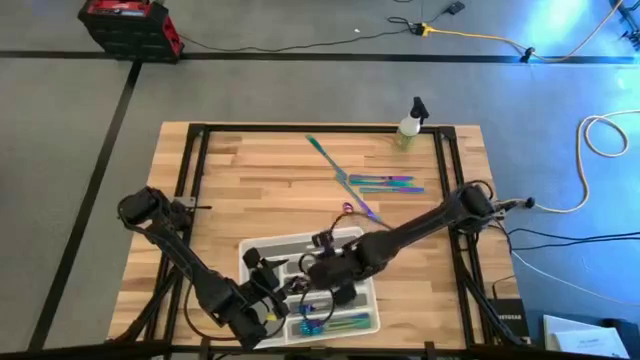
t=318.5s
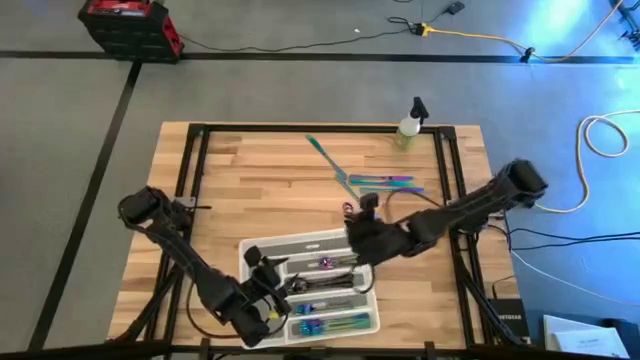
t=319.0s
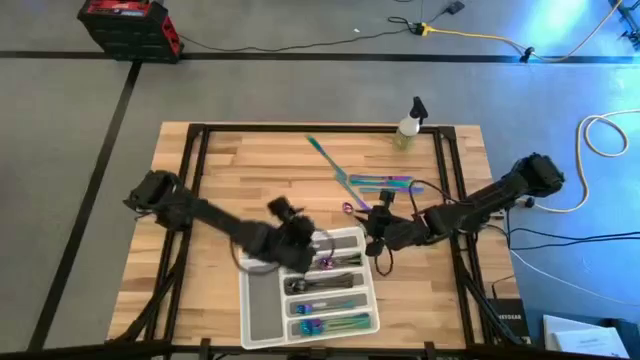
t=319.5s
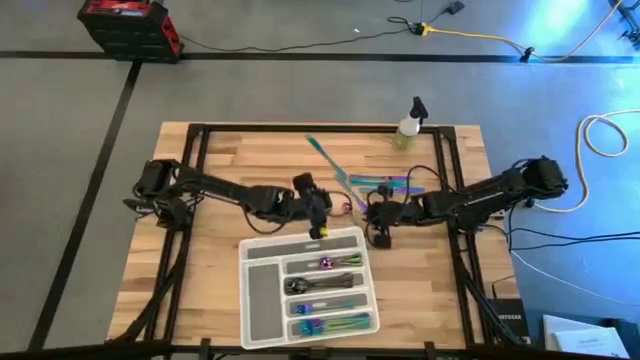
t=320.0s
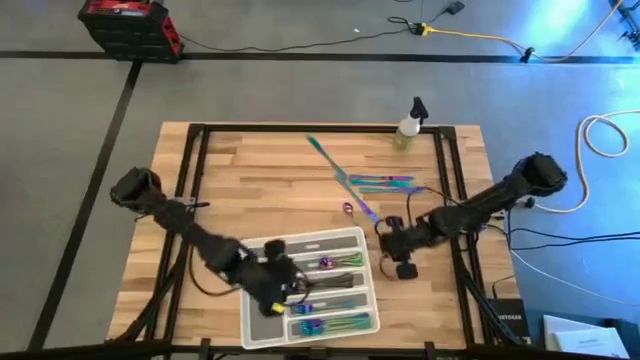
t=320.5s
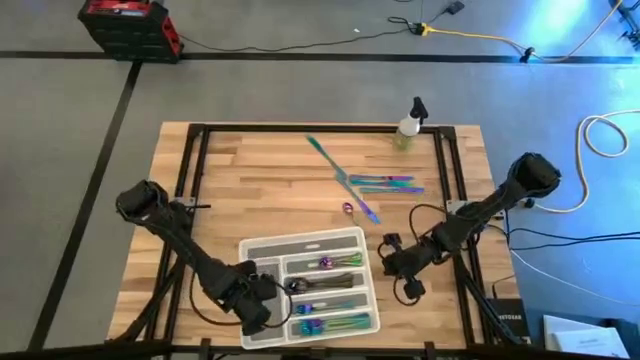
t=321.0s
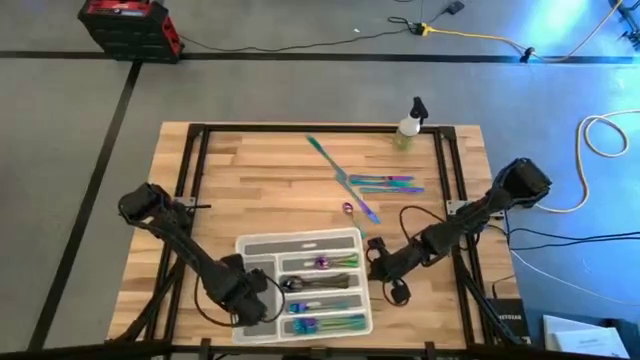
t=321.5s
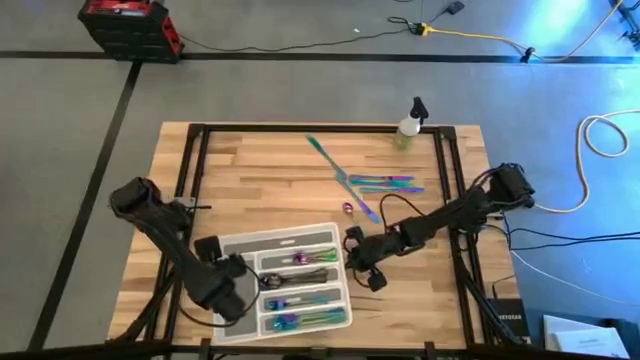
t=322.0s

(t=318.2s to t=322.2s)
Task: Sort silverware
Adjust the white silverware tray

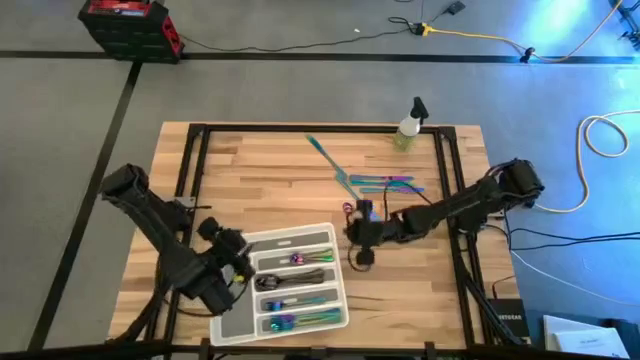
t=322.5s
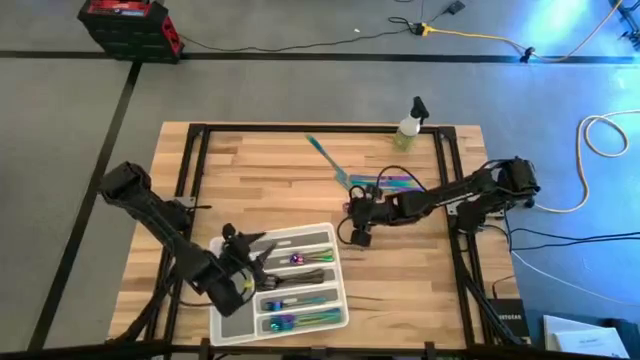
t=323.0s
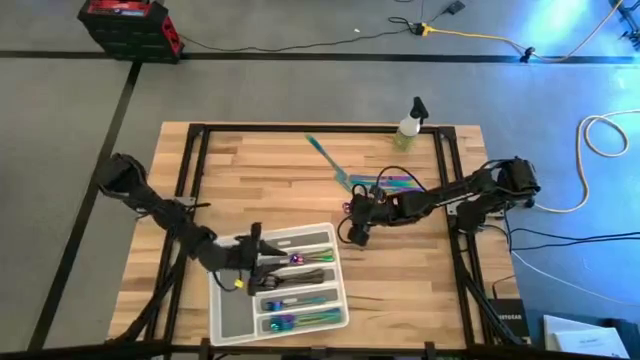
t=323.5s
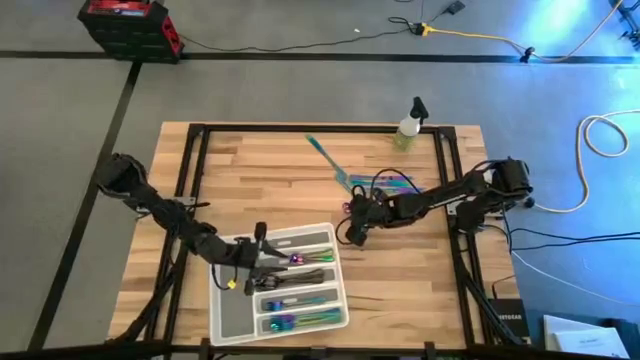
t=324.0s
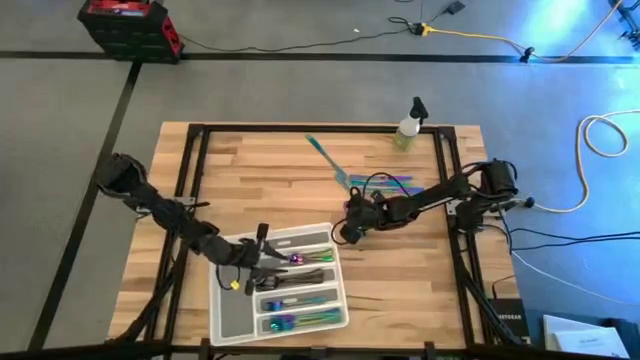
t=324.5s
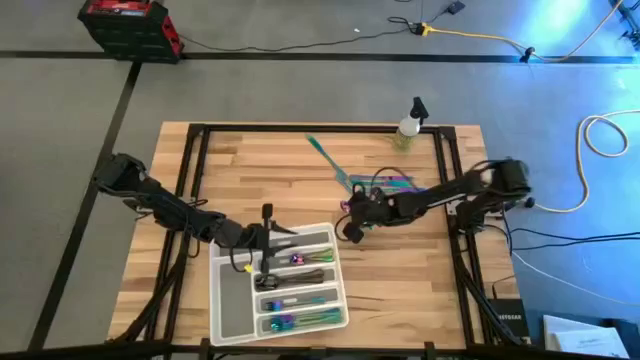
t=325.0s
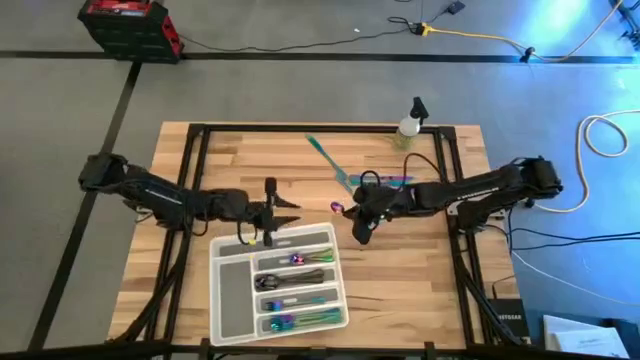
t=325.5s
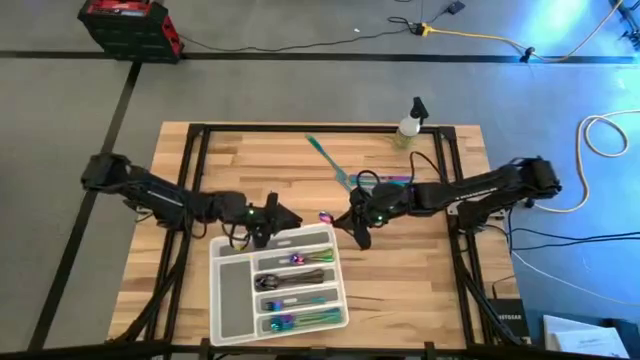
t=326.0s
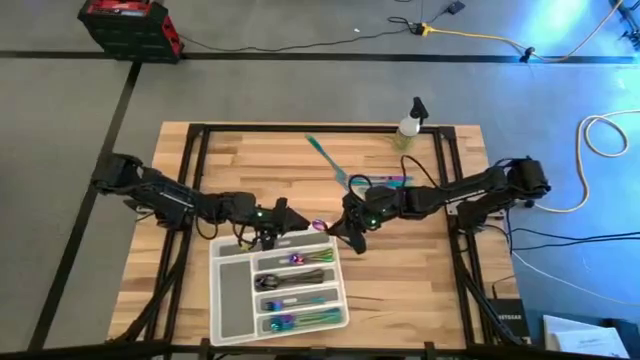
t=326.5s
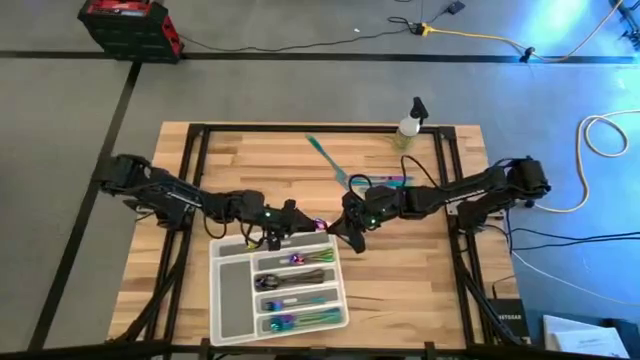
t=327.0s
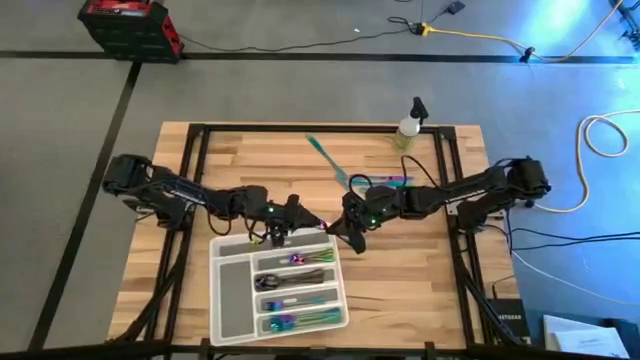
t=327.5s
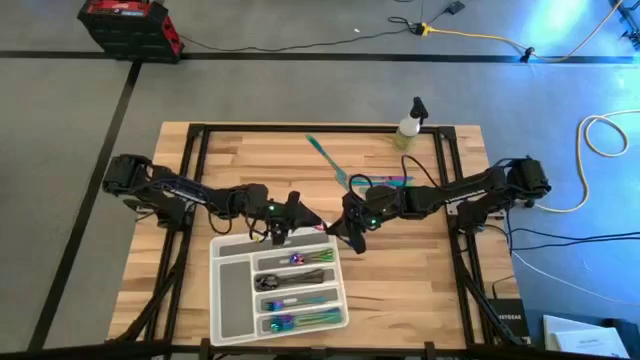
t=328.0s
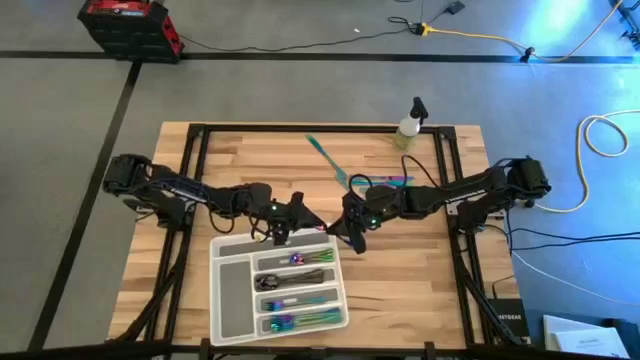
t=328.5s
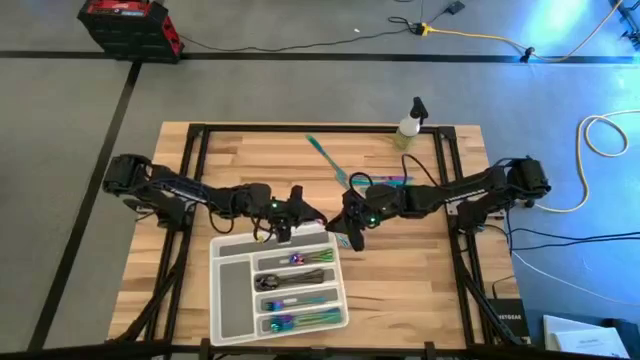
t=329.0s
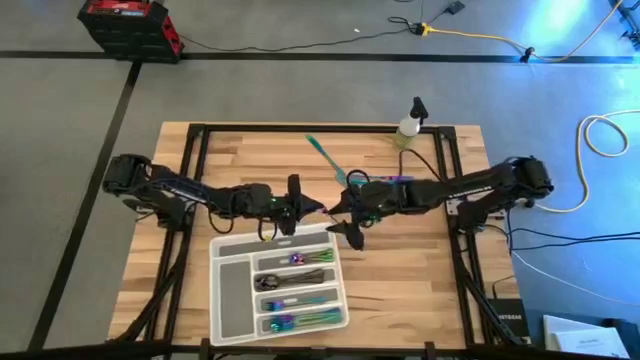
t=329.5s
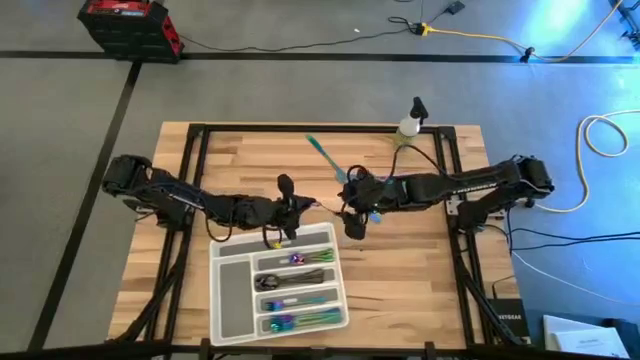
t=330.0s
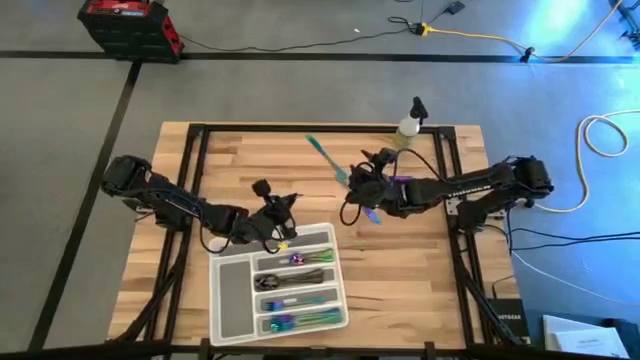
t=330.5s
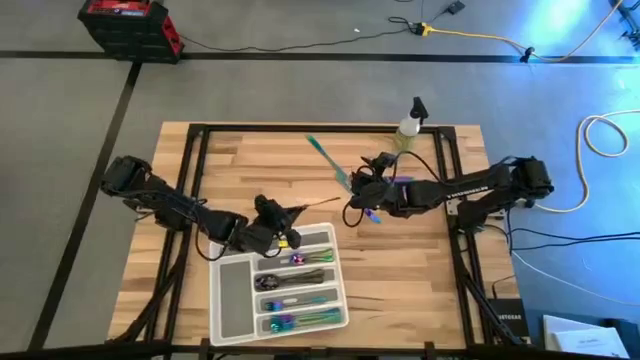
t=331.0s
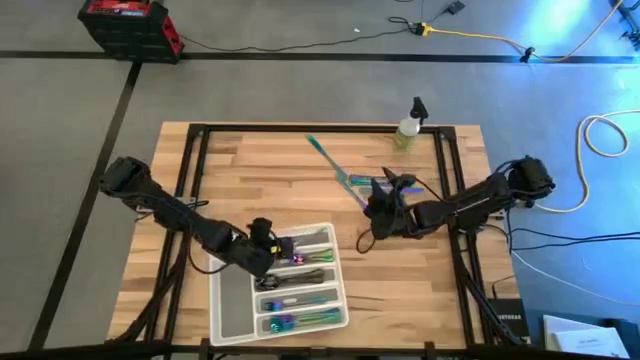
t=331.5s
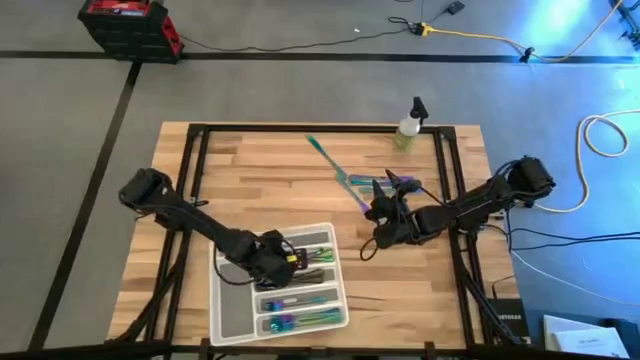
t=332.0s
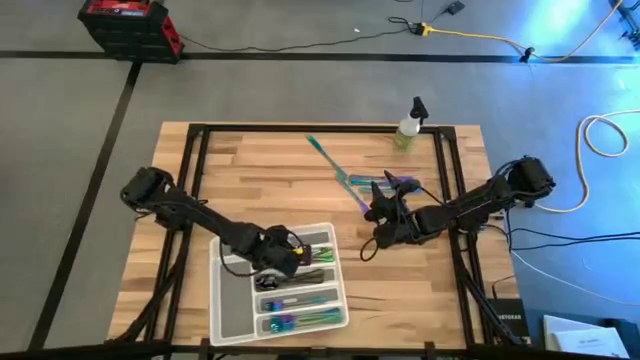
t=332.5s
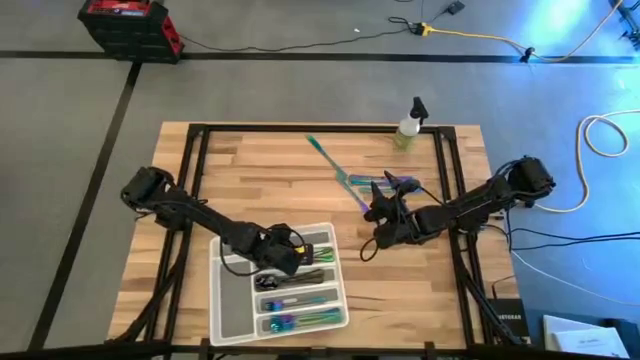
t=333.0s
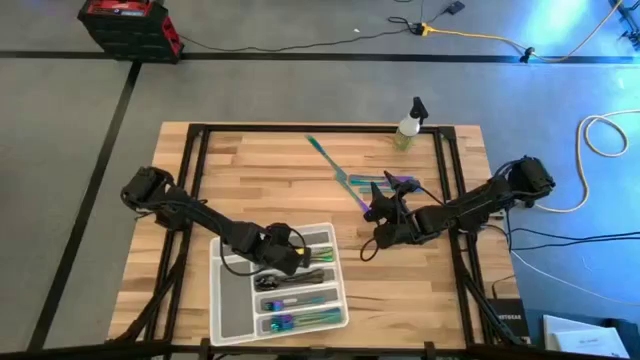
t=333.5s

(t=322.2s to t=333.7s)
Put the blue spoon into the white silverware tray

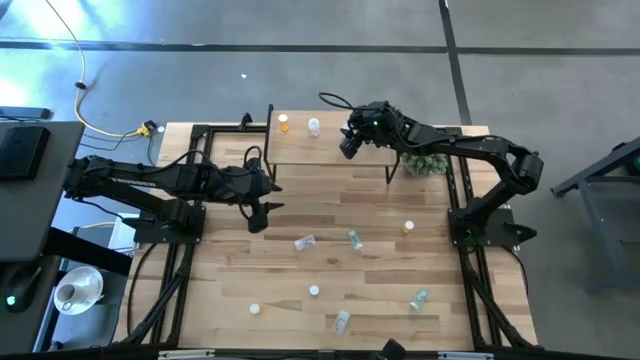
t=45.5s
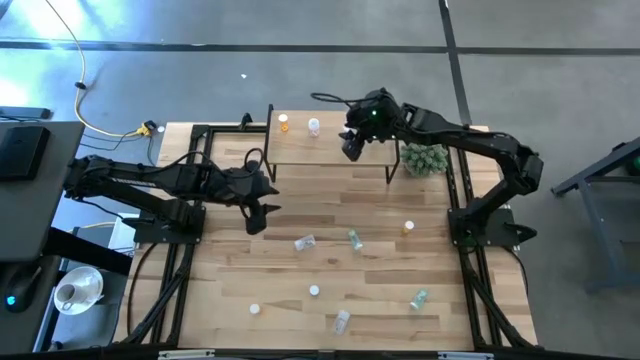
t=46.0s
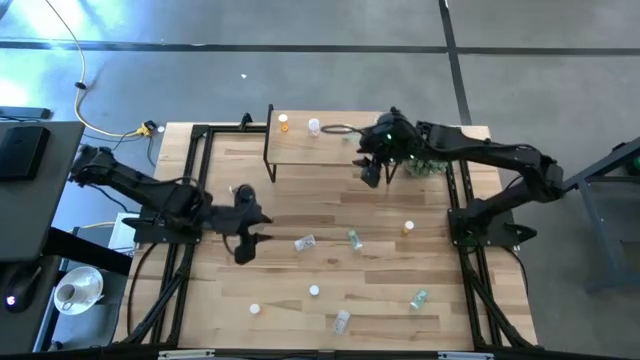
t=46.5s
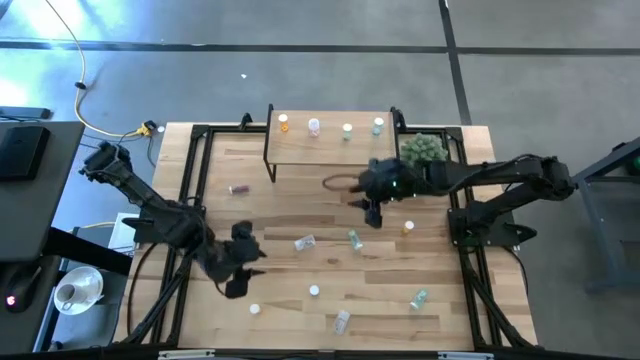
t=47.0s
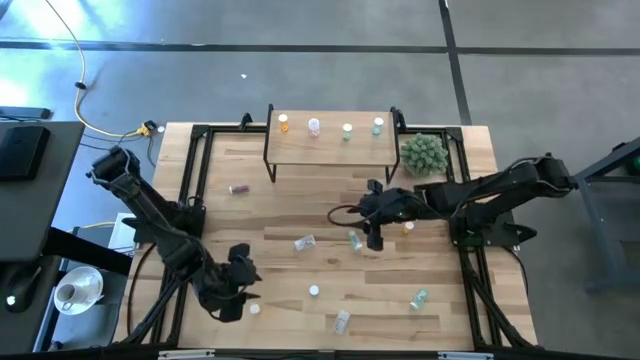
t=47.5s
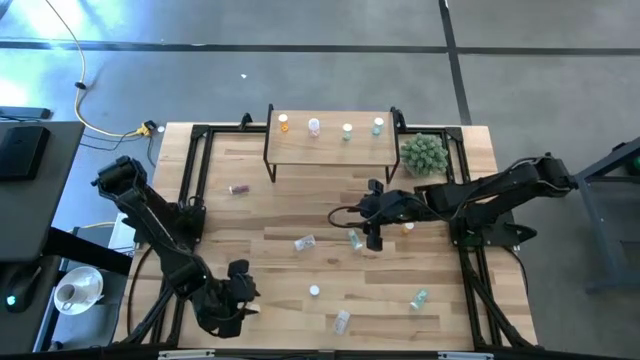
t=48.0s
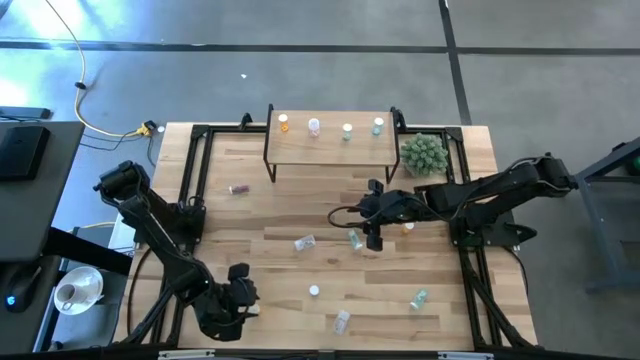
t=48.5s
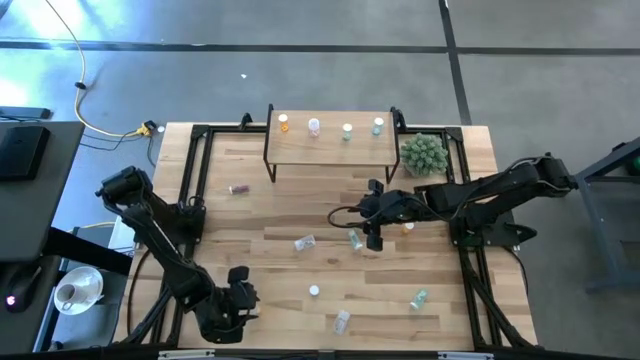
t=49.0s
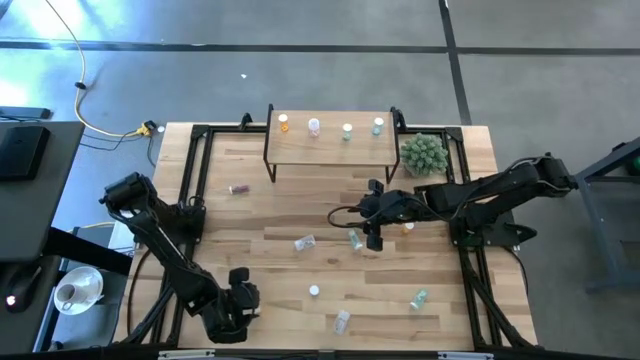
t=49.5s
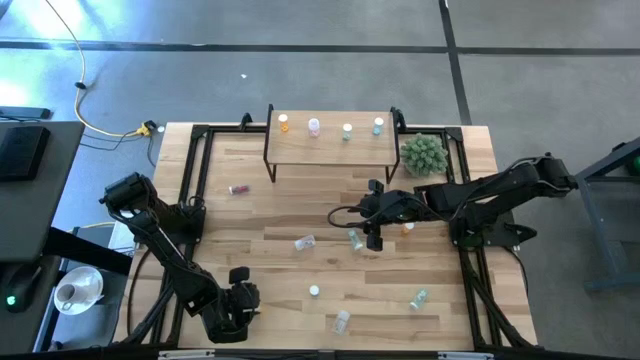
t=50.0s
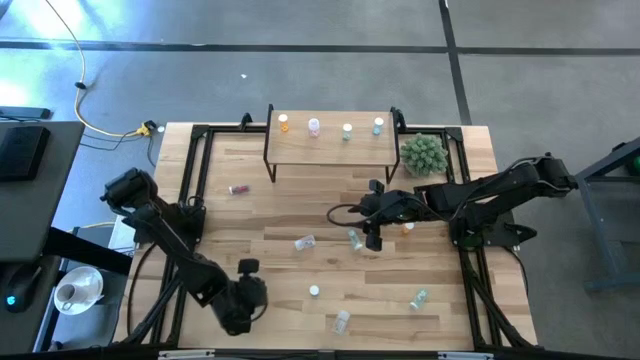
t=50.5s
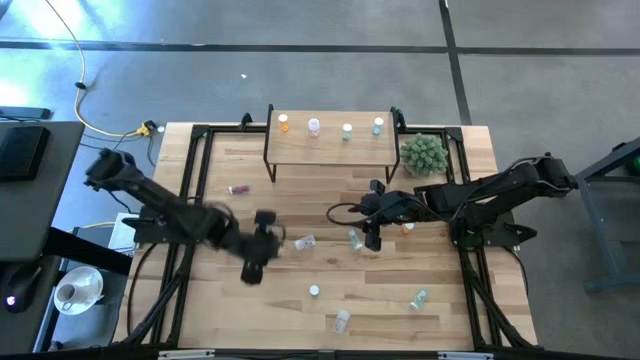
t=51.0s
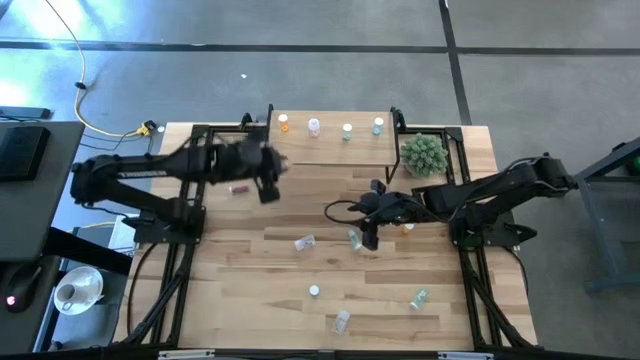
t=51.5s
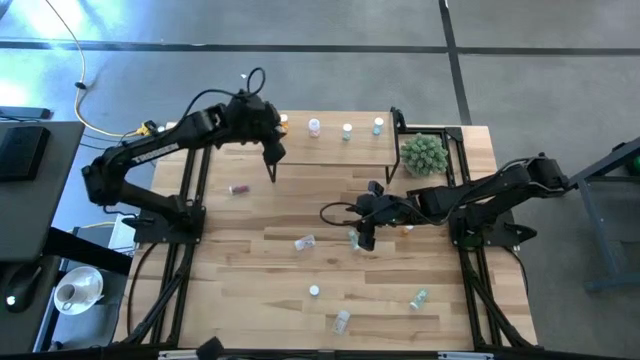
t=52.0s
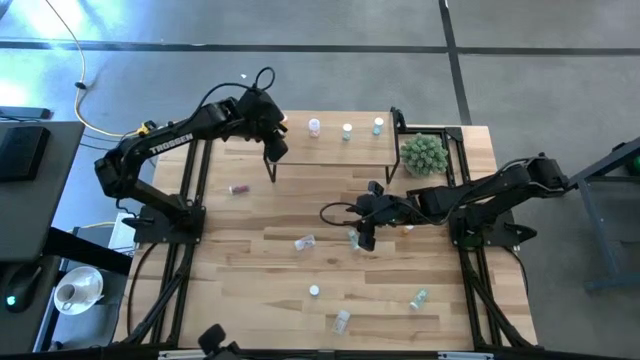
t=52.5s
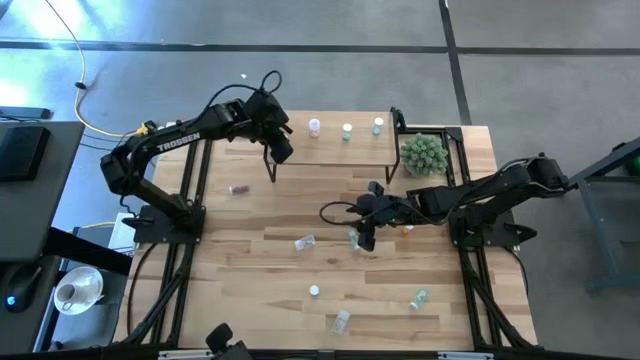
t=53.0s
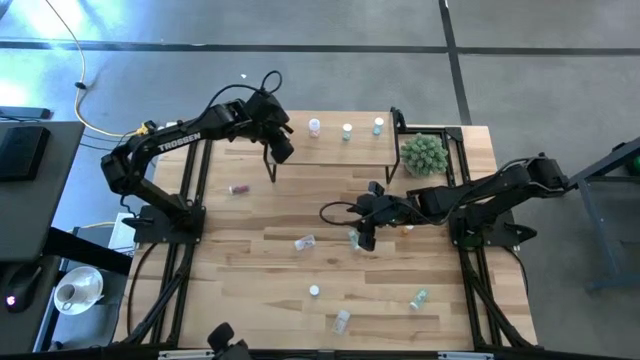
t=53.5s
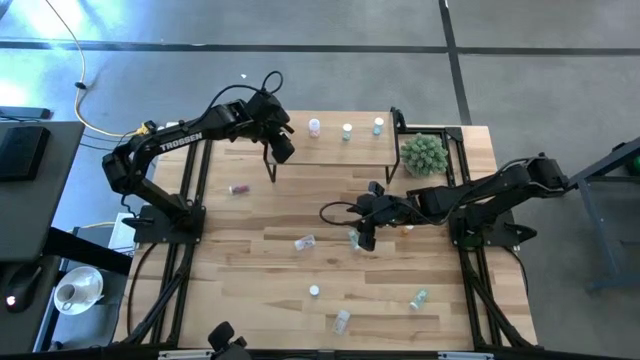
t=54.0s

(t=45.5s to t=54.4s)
Task: Pick and place medicine bottles onto shelf by color
Put the bottom orange pill bottle on the shelf and aligned with the other orange pill bottle
